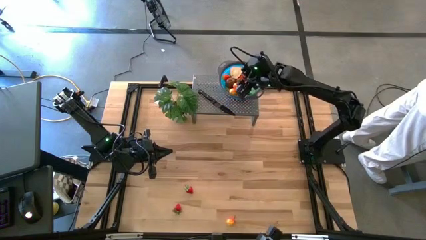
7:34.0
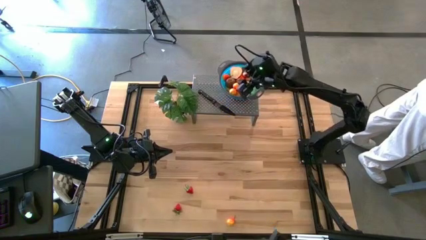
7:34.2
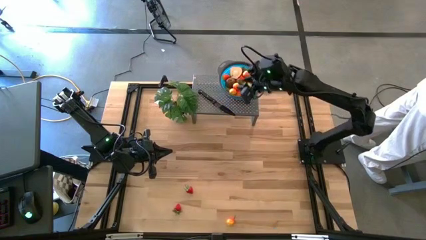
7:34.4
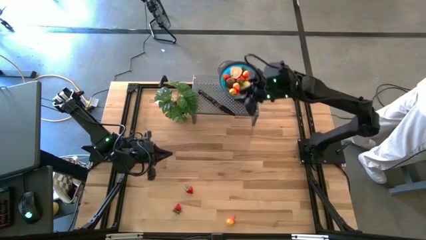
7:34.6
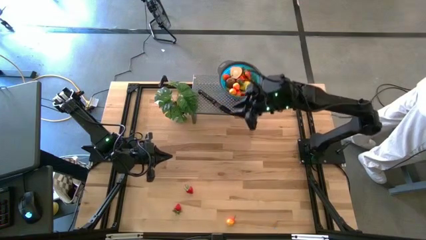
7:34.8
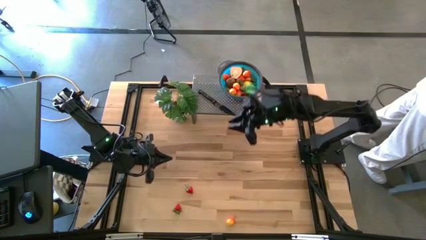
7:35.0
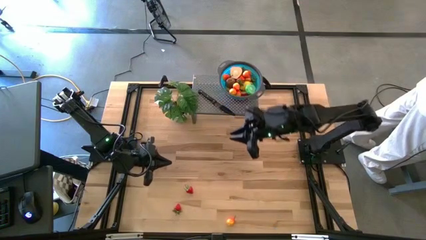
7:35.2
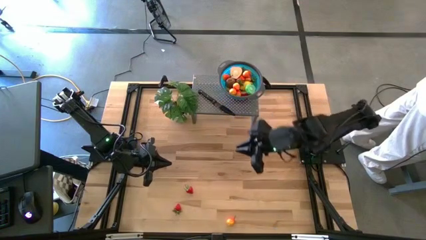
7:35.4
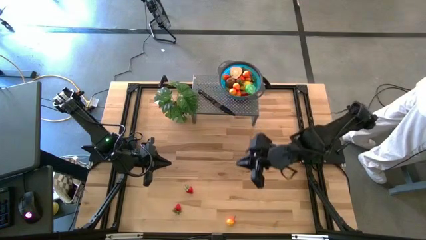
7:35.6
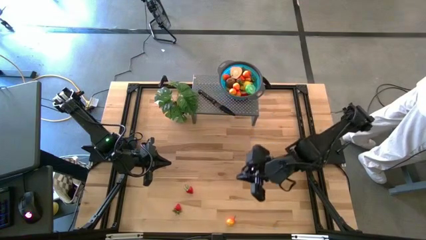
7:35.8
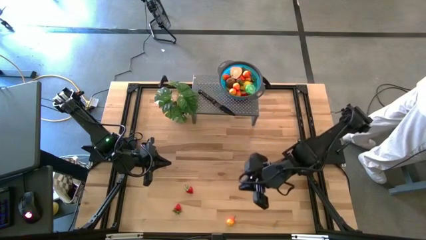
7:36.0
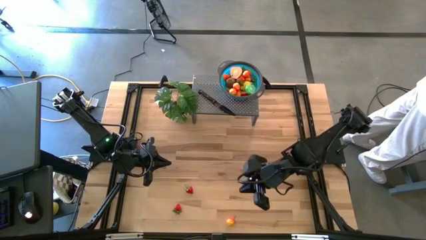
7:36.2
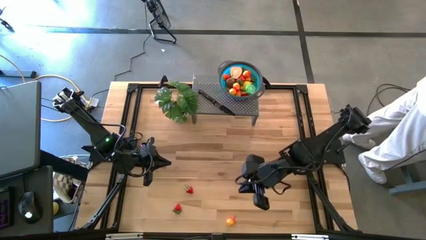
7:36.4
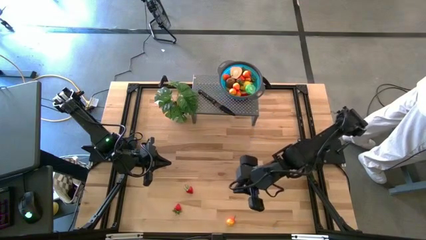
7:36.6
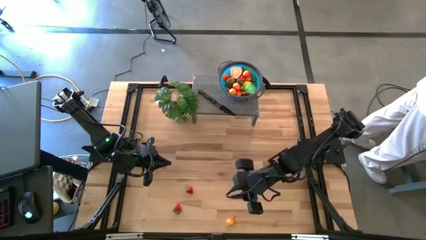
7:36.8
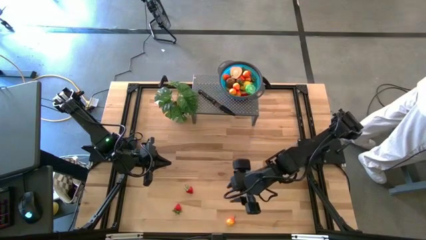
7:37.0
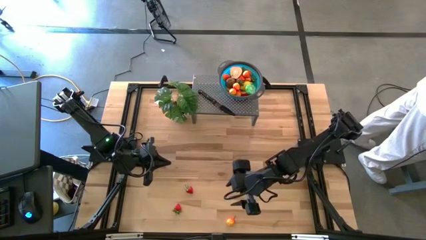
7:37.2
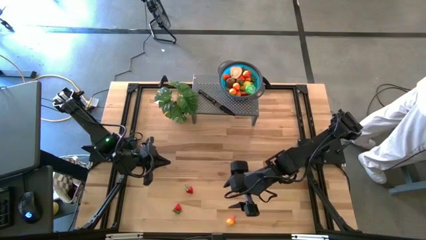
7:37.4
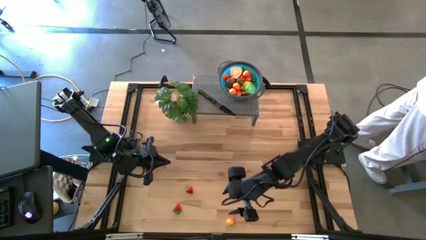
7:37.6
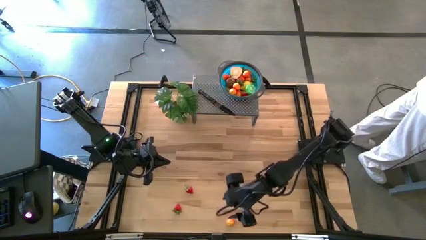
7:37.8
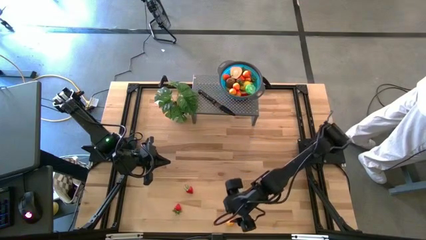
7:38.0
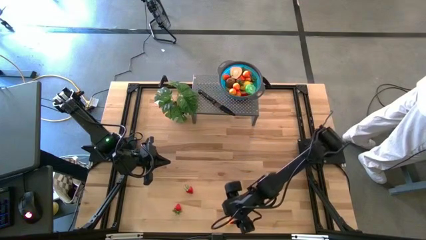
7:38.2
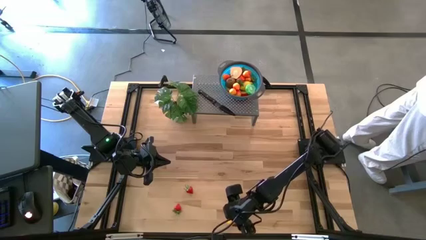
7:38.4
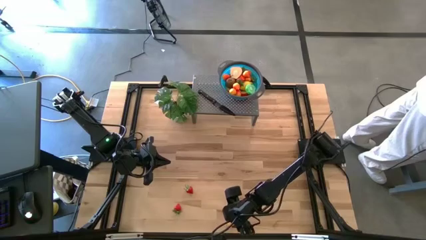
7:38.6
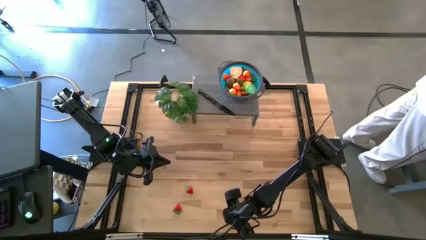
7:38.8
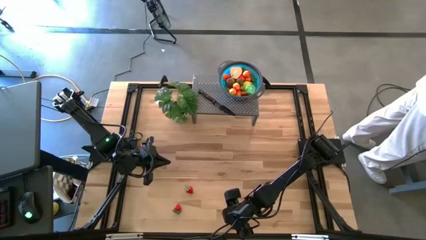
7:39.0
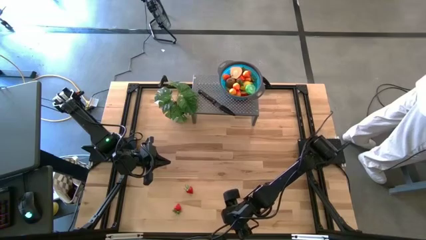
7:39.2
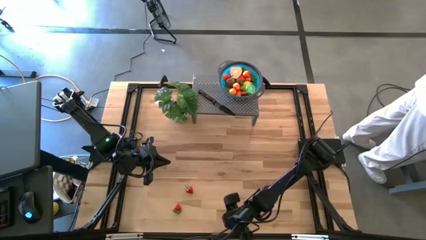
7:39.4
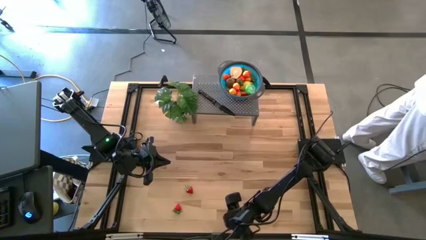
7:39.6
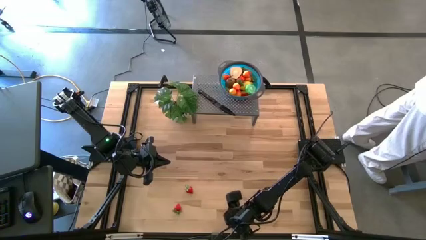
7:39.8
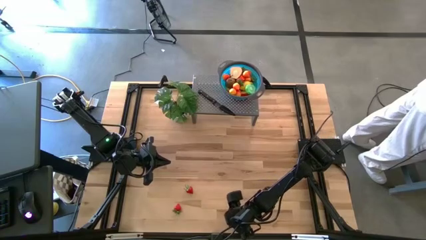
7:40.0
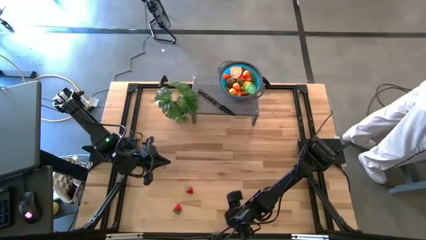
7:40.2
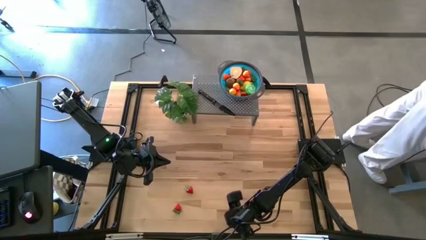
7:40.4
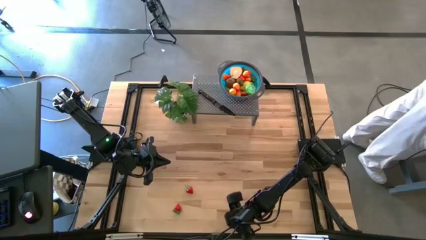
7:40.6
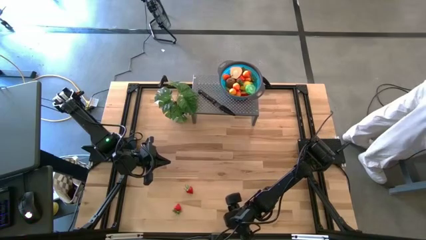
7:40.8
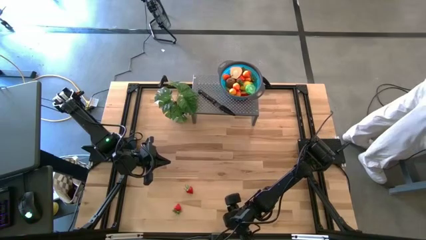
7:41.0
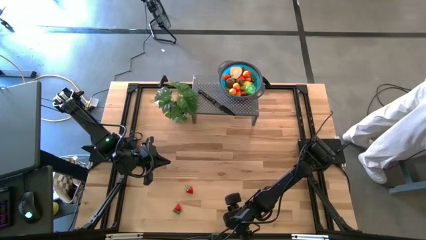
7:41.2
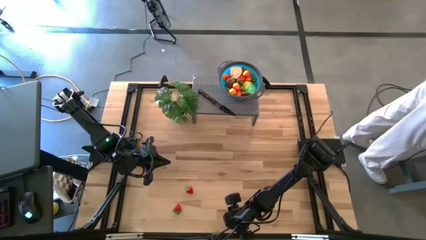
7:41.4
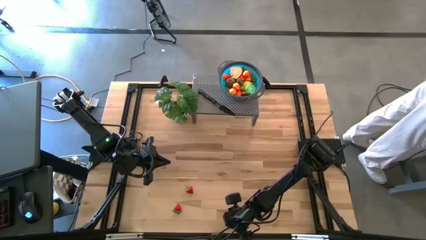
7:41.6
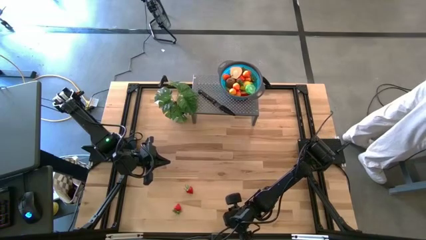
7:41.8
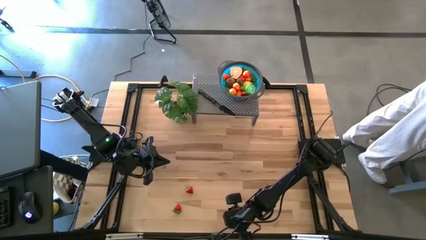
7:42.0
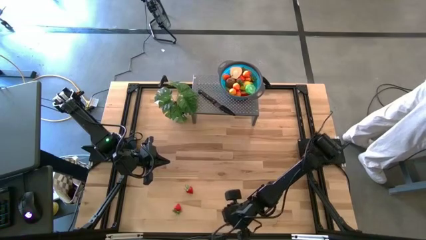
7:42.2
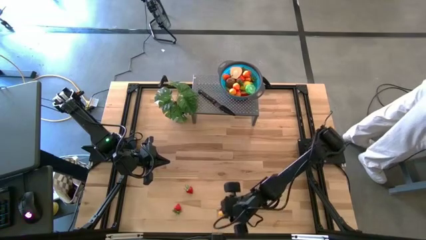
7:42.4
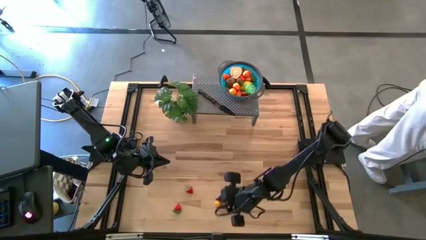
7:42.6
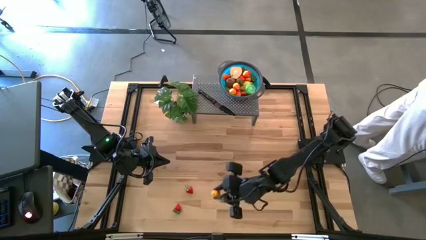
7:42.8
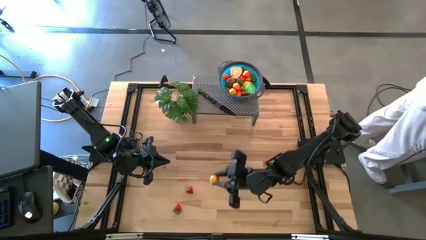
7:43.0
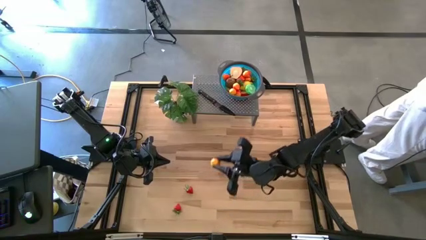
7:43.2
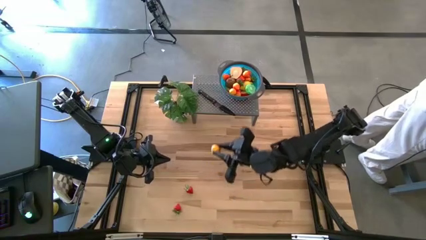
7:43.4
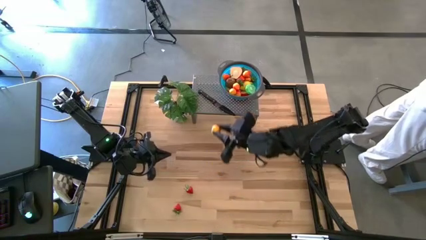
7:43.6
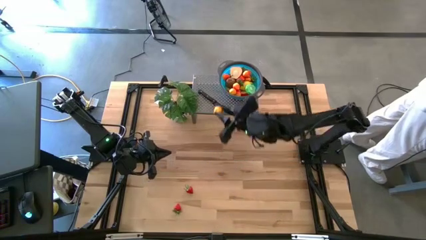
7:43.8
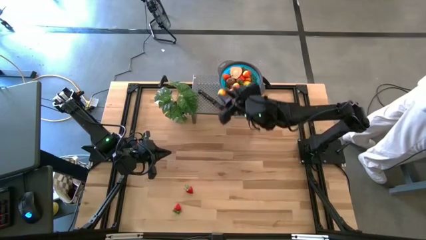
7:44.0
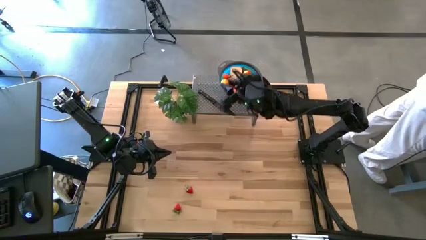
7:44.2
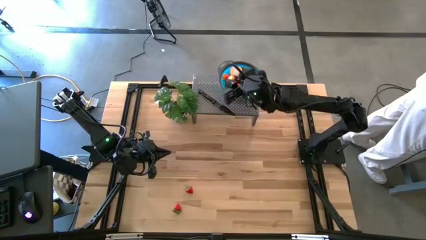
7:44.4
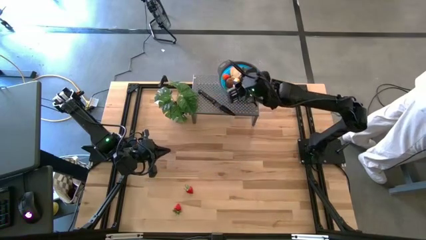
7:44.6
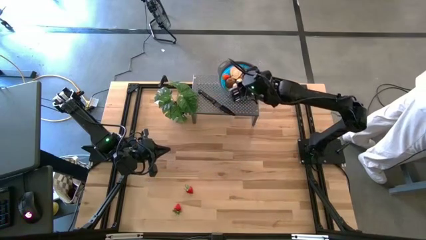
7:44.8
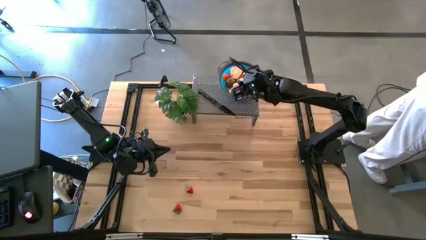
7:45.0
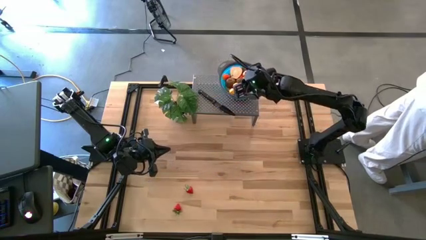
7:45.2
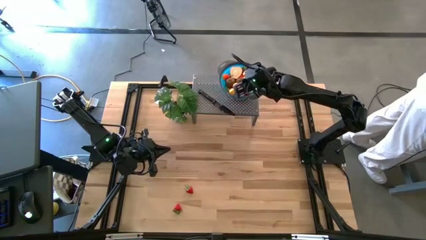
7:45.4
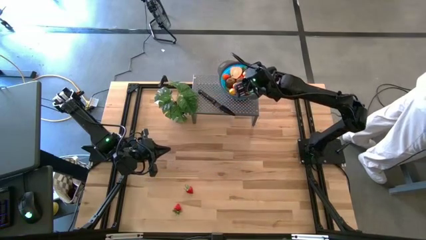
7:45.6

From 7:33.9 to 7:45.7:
Task: Pick & Place Fruit
Put the yellow pear in the blue bowl on the shelf

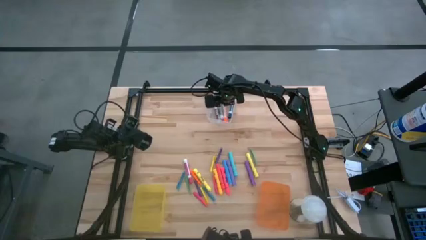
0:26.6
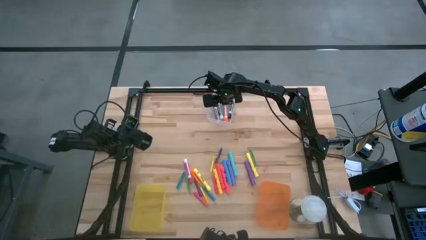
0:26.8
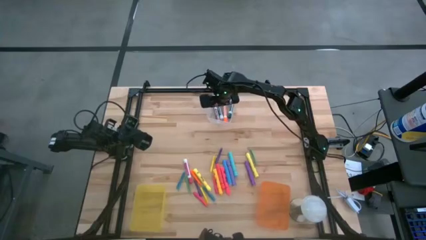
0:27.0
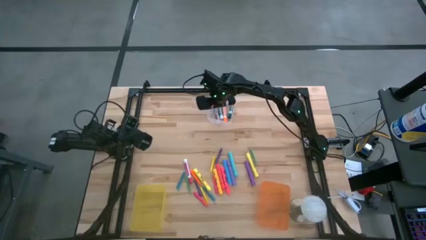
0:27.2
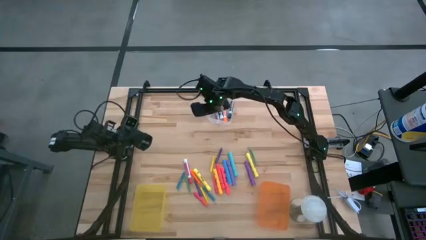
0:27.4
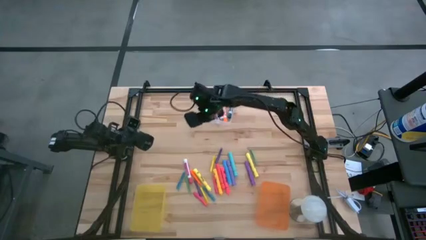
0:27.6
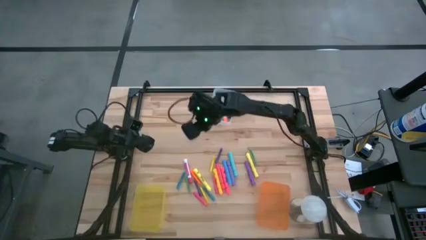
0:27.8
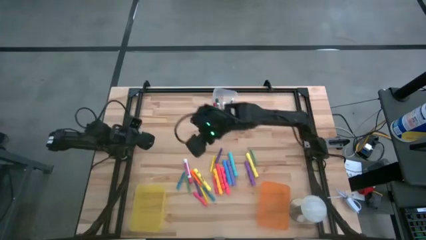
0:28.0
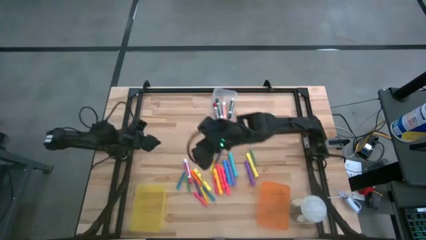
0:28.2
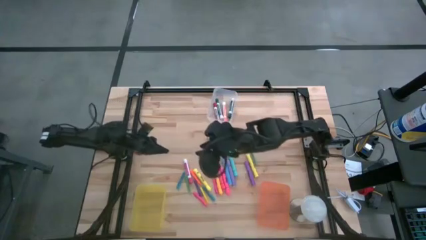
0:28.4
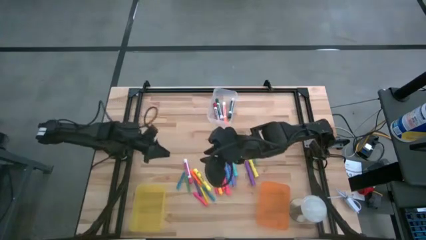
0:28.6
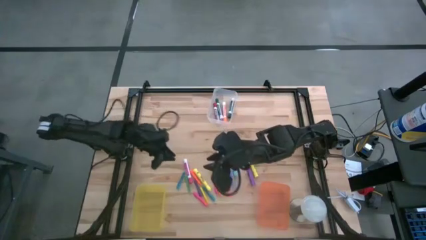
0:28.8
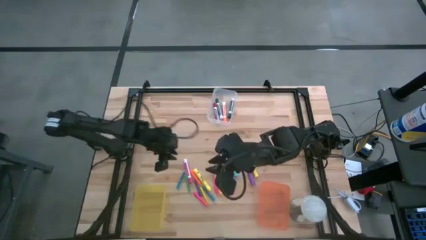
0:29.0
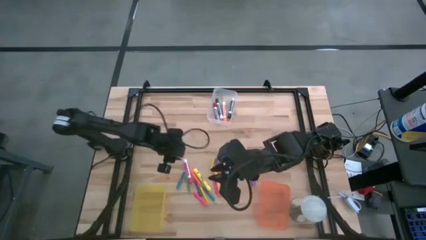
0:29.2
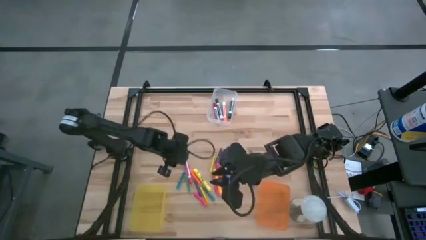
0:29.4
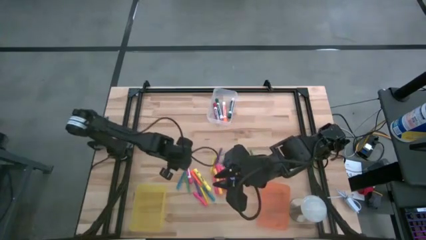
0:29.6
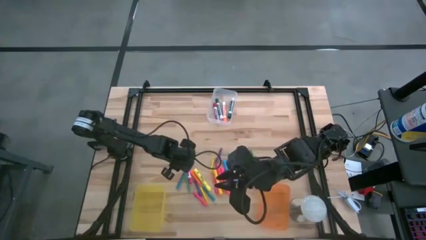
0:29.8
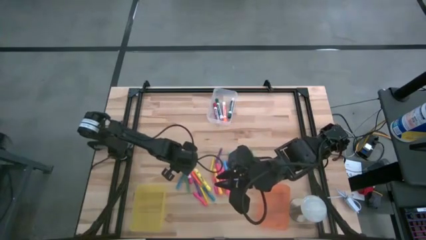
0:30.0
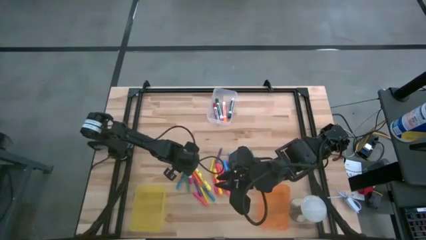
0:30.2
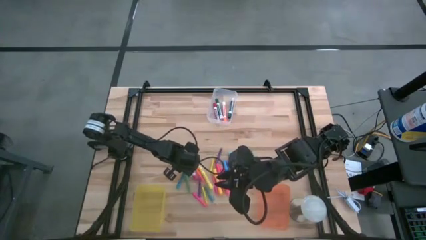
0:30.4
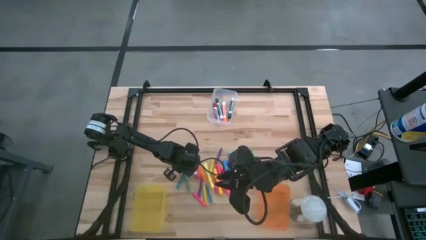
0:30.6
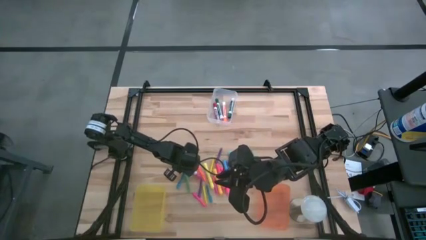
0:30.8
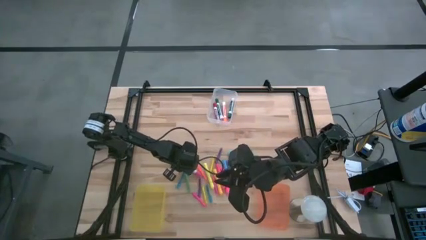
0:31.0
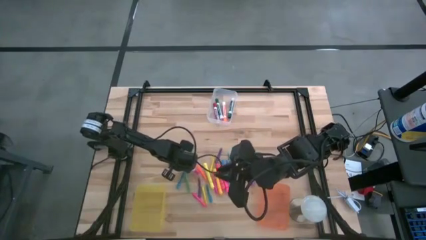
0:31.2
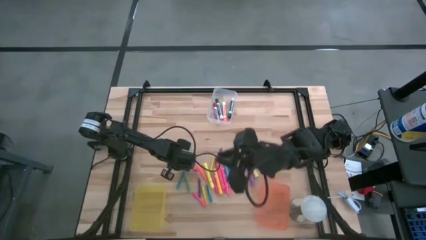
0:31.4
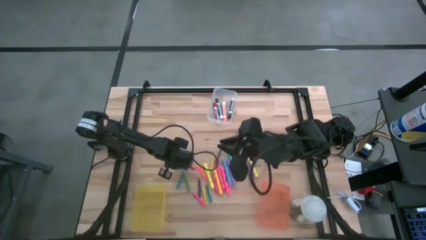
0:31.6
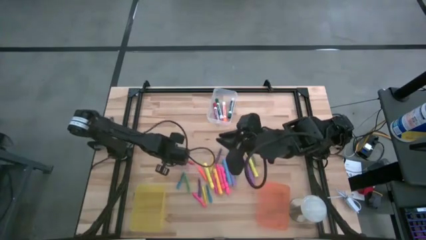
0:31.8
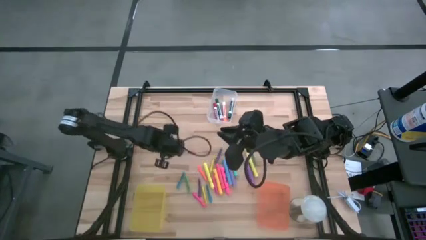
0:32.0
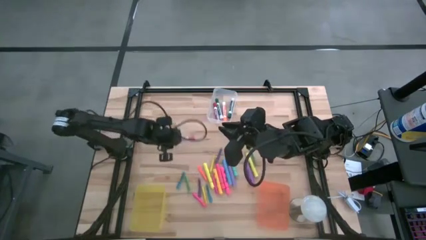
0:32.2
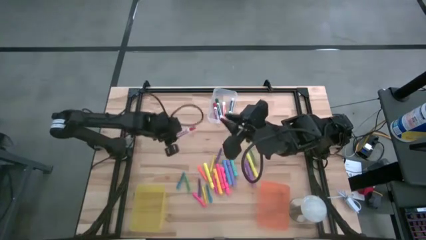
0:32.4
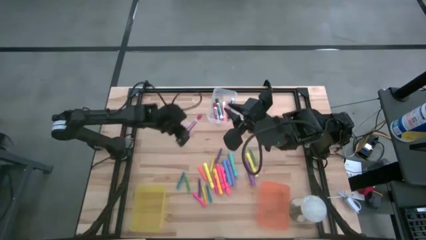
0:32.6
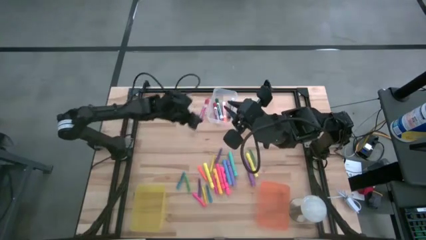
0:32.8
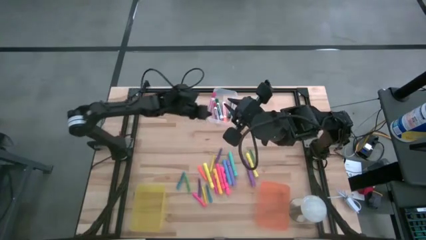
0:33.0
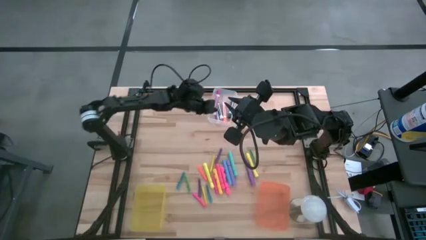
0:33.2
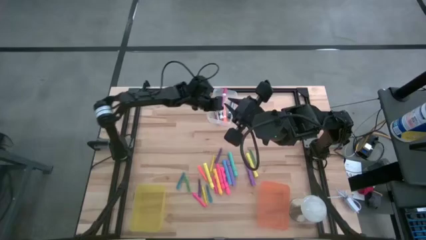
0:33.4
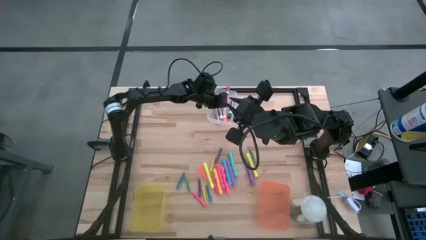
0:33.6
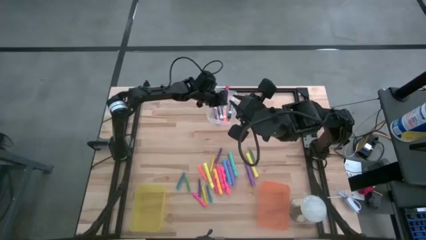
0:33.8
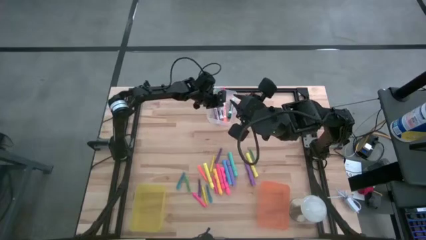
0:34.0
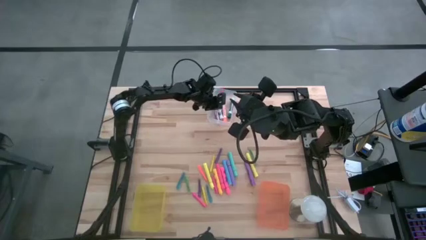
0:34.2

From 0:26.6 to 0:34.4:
Task: Pick & Place Markers
Put the pink and white marker pen into the white bin
